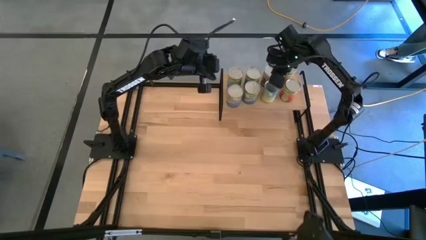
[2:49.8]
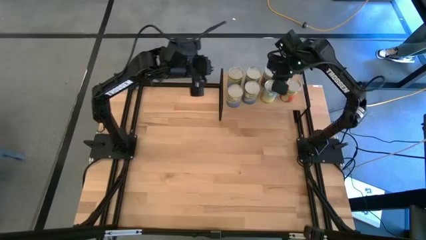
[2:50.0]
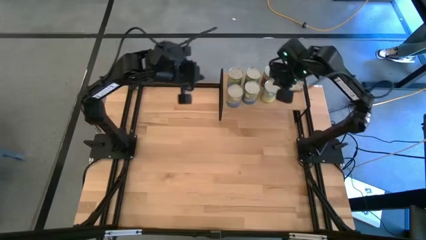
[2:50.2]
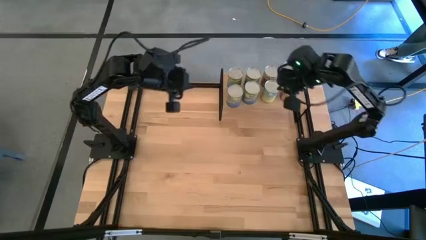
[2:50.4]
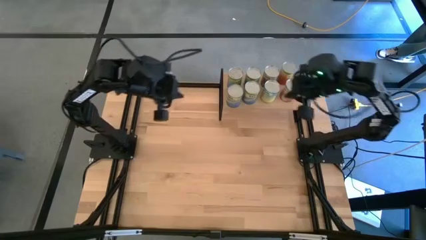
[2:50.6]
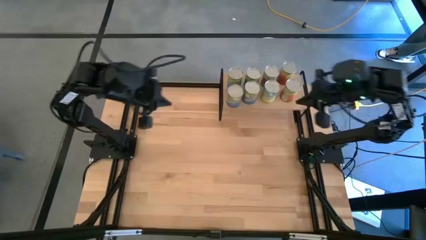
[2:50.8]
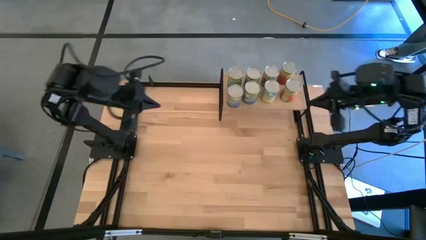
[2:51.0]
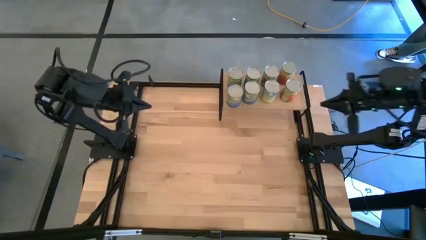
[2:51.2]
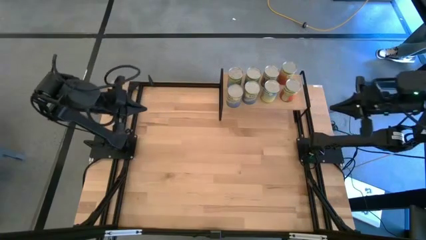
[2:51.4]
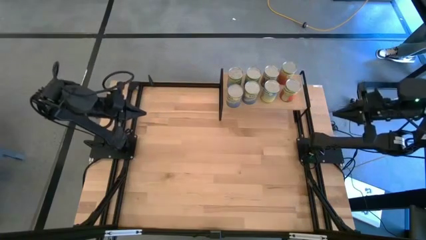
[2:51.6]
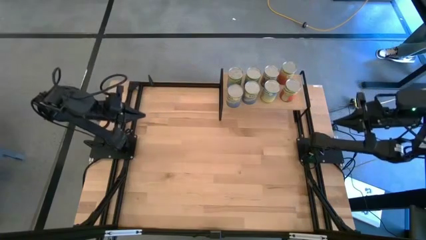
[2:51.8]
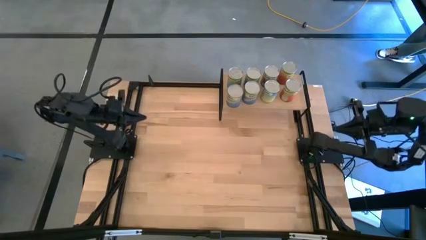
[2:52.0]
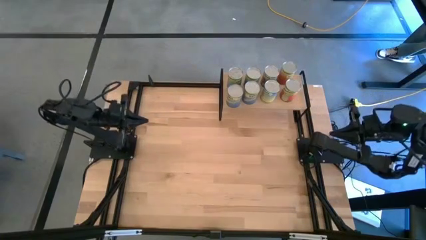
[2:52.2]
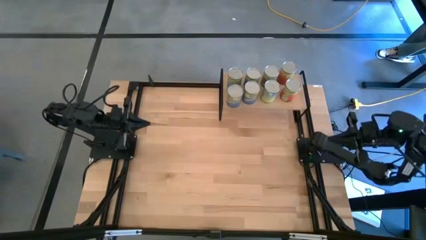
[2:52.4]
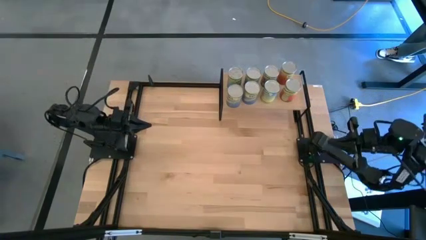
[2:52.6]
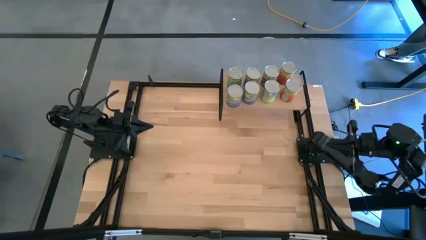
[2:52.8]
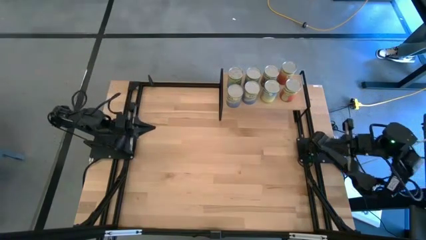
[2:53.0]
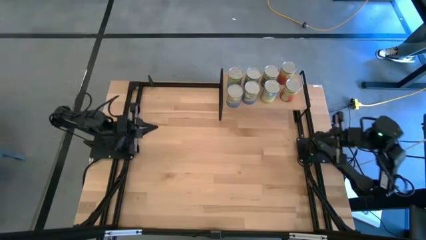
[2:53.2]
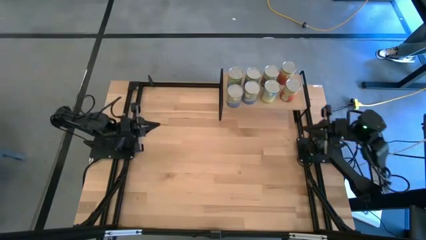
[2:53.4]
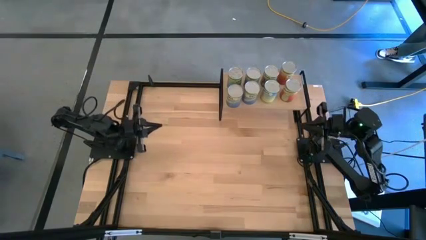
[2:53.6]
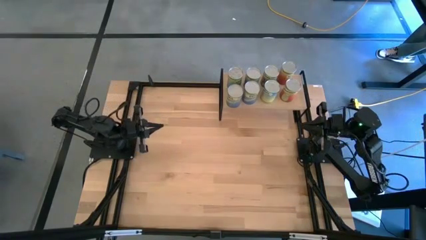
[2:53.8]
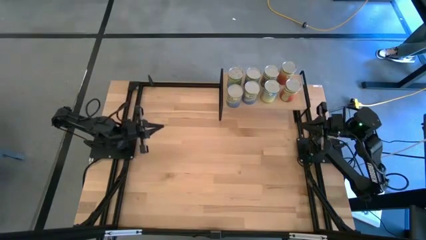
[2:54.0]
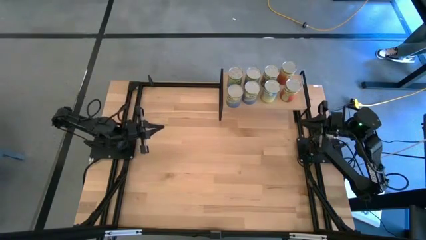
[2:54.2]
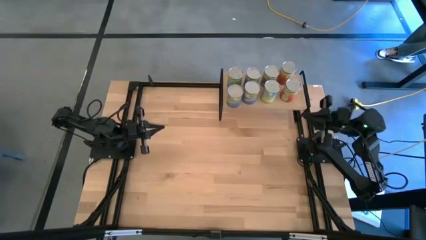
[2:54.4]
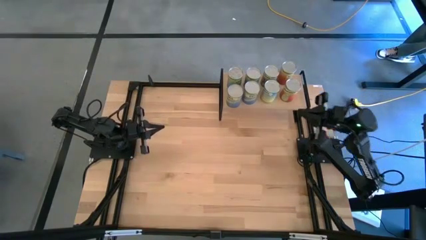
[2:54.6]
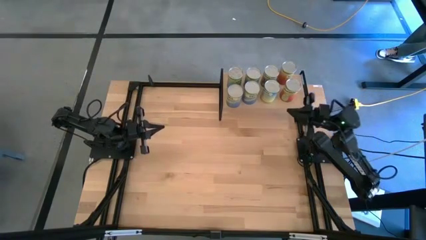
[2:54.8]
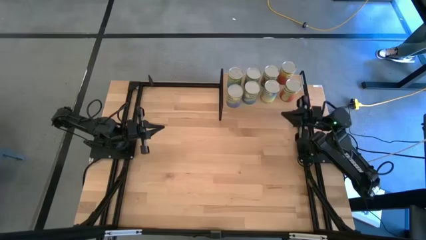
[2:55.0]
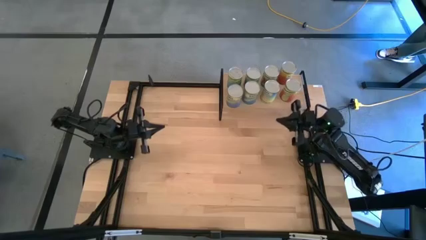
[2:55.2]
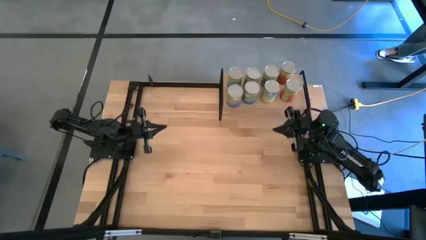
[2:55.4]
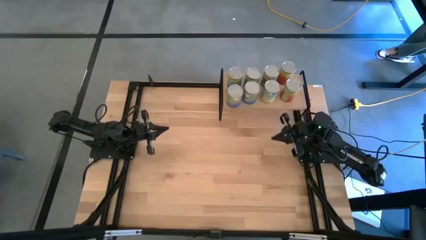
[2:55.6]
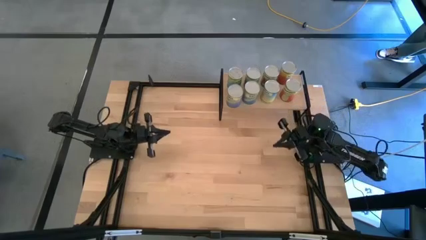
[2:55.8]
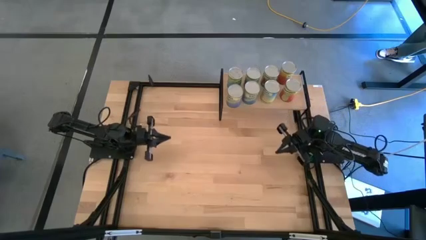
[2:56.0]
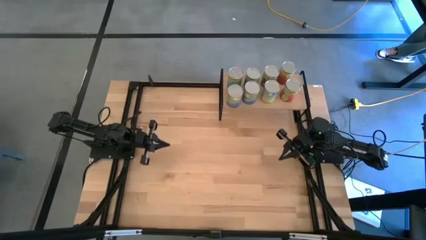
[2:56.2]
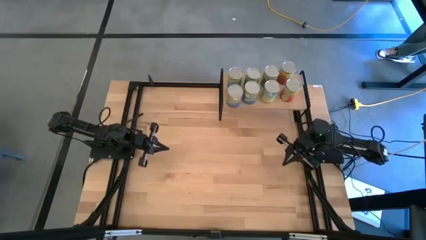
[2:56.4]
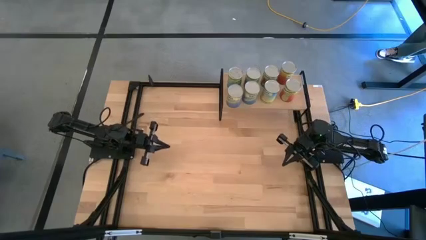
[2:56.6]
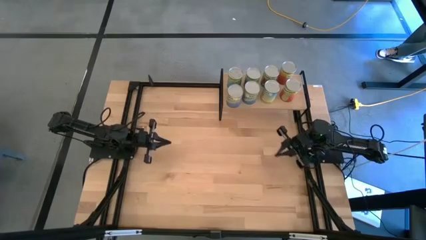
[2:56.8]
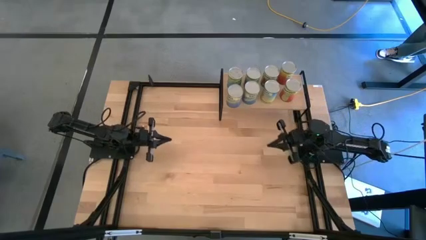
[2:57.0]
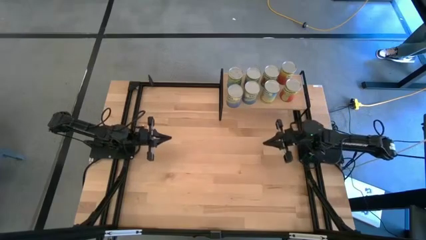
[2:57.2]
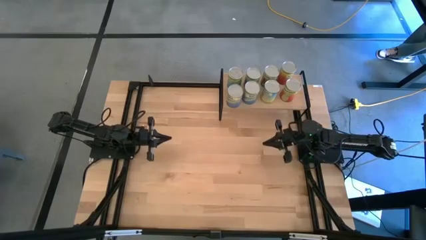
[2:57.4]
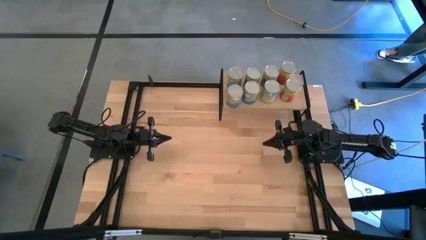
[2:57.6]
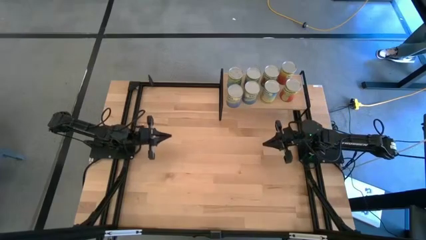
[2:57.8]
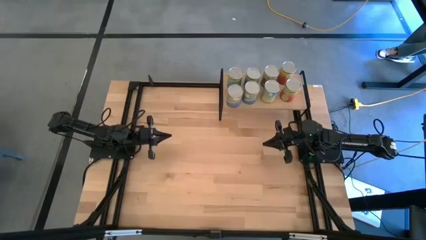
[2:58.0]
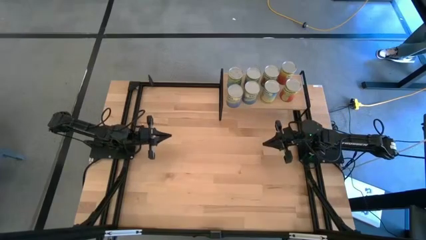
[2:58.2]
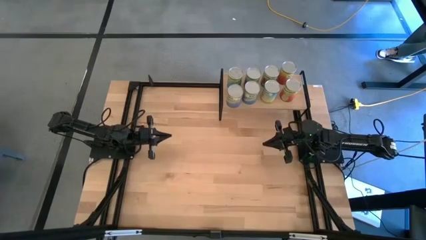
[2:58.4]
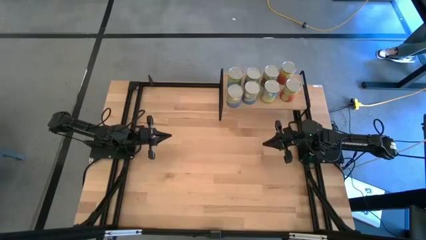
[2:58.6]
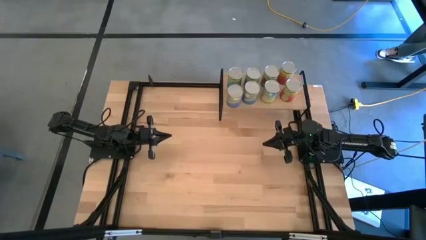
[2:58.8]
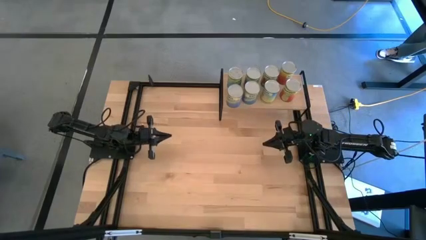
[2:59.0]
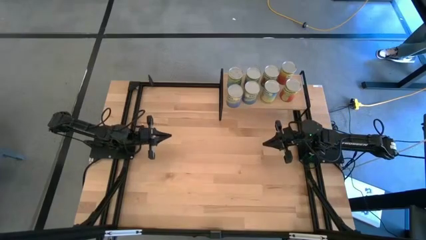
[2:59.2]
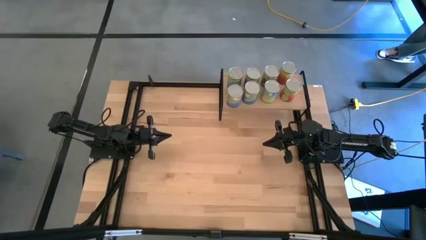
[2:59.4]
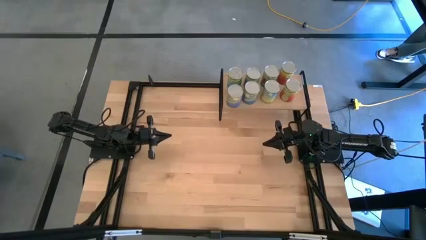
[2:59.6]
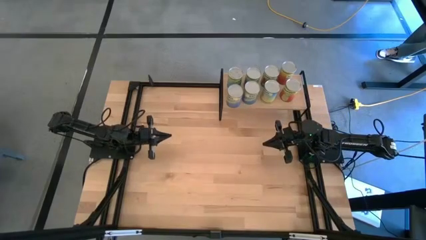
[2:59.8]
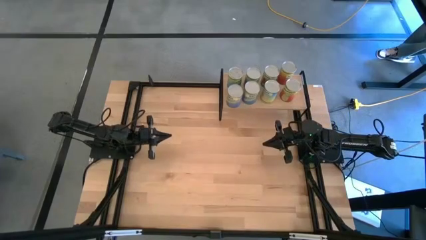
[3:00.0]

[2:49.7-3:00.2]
Task: Pick and place cans onto a shelf
Return to Home Position

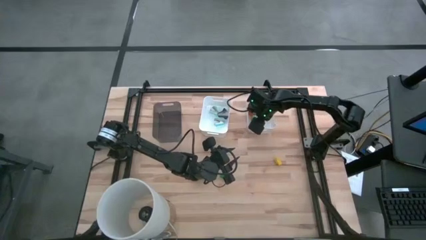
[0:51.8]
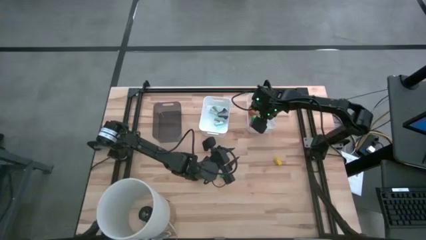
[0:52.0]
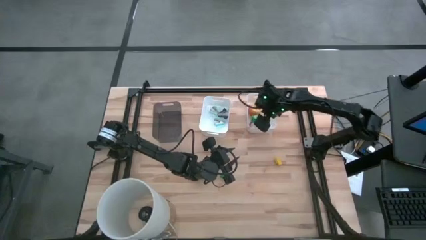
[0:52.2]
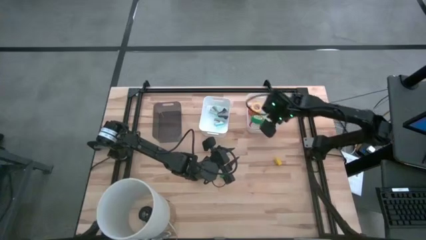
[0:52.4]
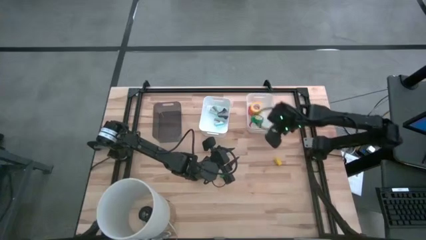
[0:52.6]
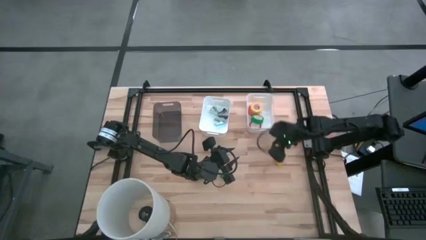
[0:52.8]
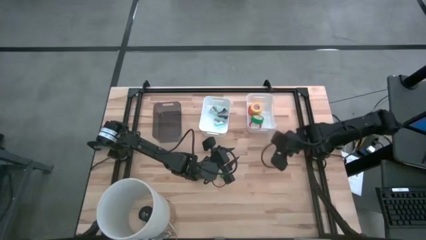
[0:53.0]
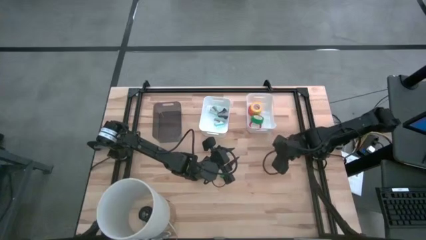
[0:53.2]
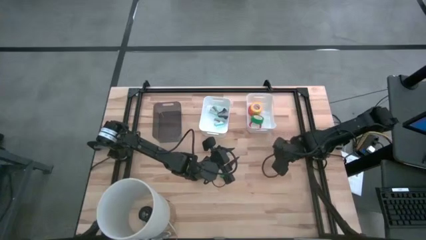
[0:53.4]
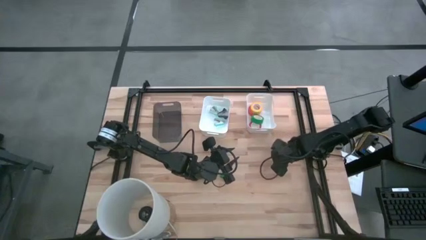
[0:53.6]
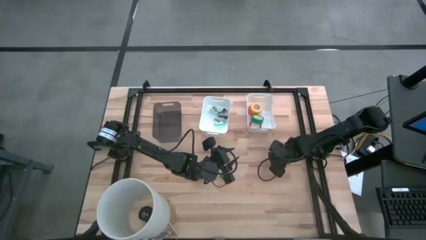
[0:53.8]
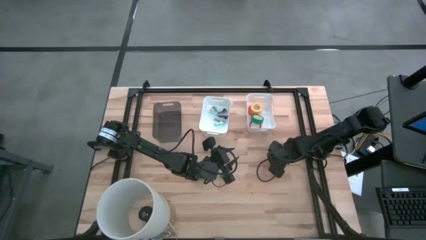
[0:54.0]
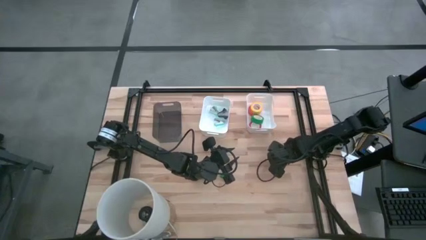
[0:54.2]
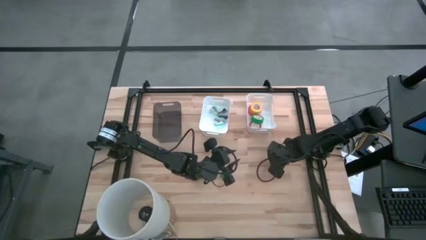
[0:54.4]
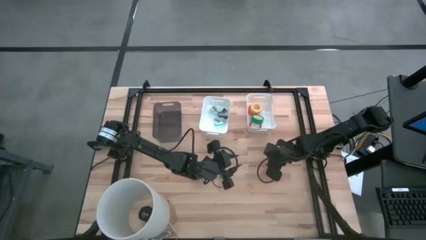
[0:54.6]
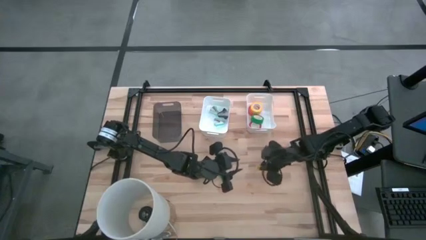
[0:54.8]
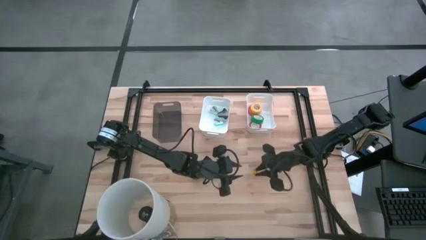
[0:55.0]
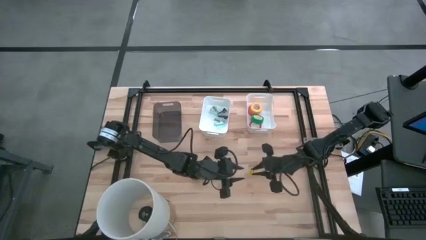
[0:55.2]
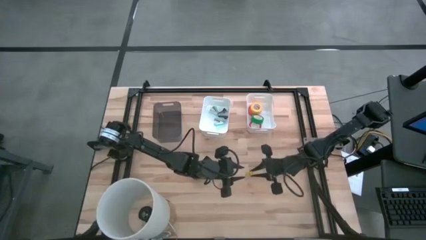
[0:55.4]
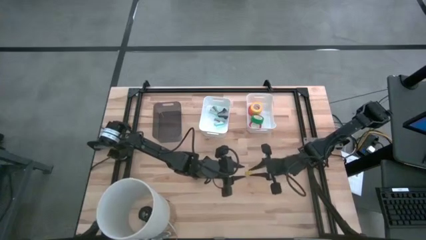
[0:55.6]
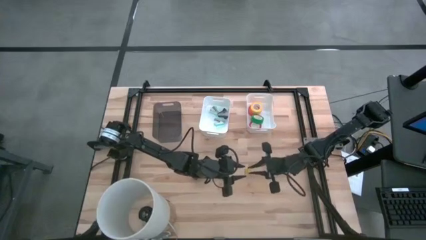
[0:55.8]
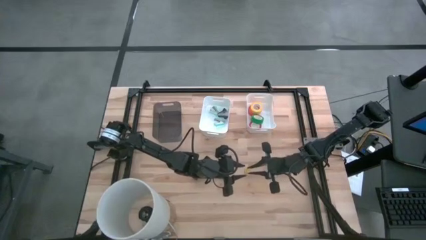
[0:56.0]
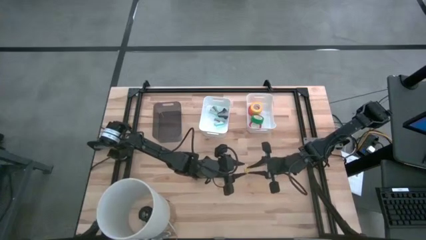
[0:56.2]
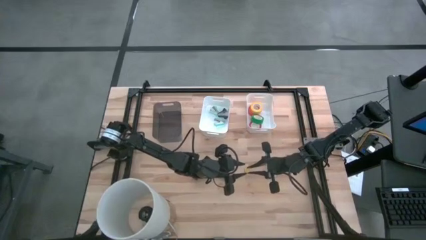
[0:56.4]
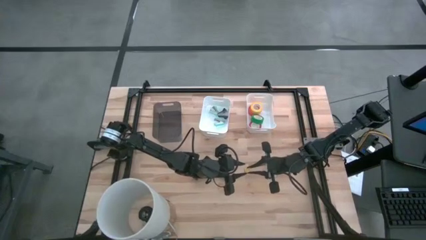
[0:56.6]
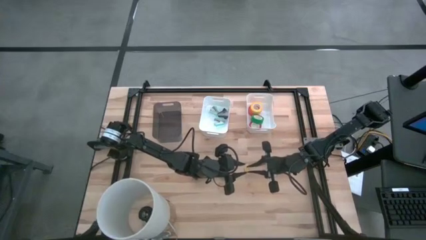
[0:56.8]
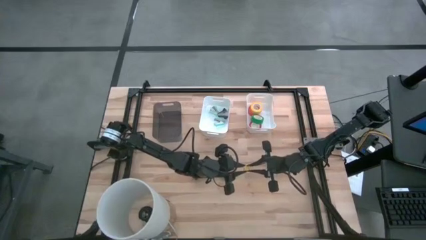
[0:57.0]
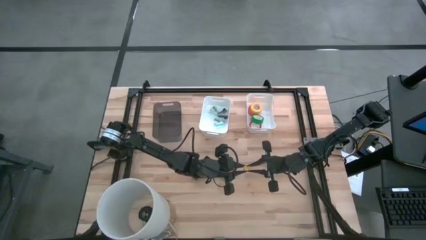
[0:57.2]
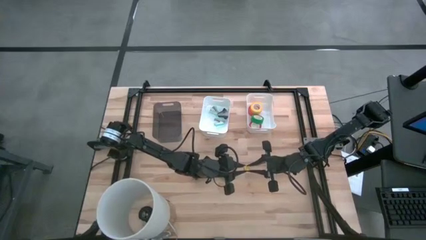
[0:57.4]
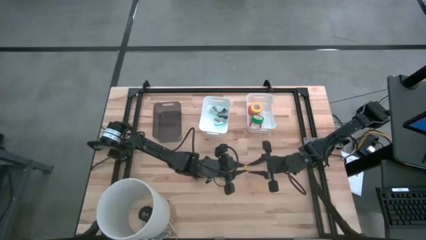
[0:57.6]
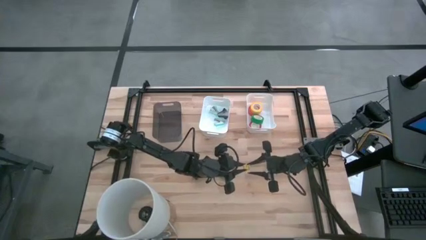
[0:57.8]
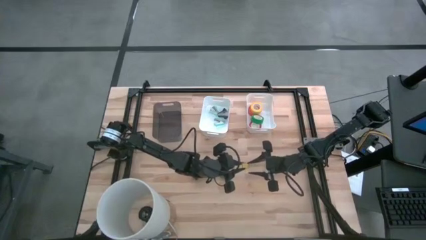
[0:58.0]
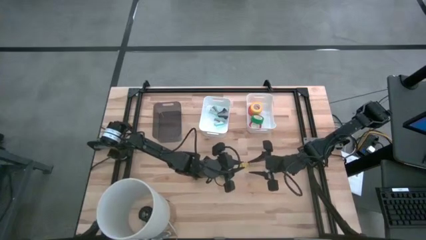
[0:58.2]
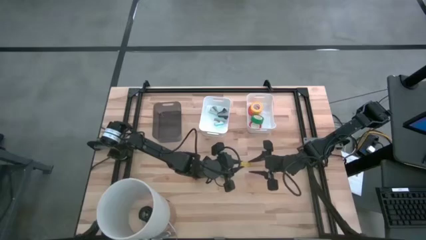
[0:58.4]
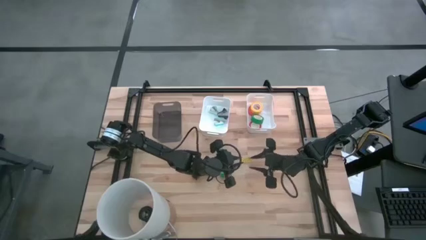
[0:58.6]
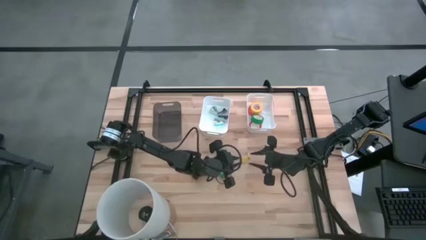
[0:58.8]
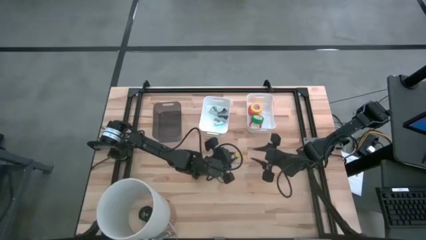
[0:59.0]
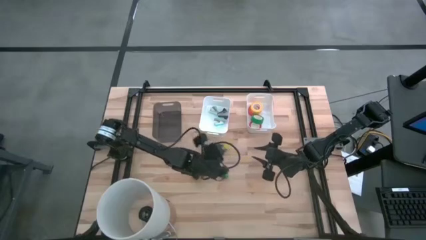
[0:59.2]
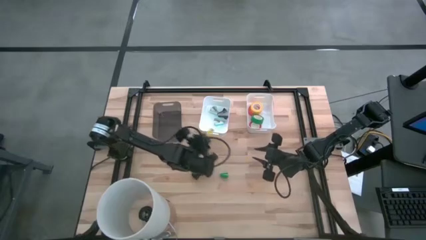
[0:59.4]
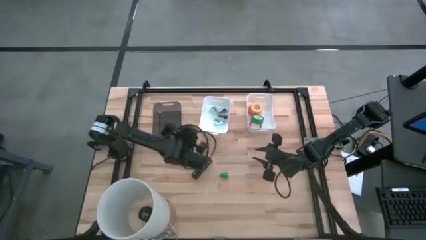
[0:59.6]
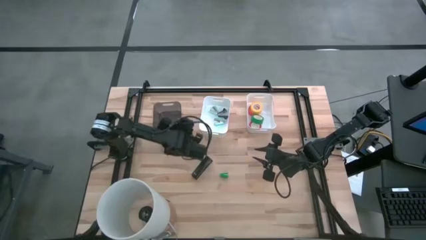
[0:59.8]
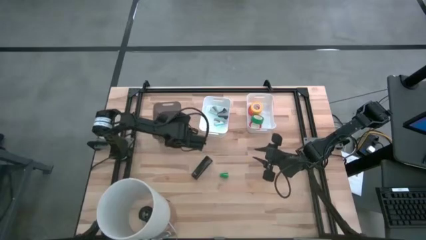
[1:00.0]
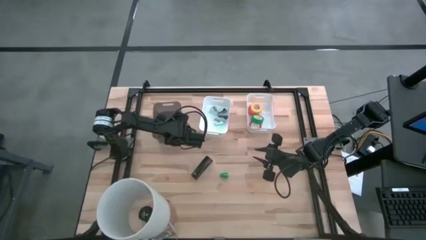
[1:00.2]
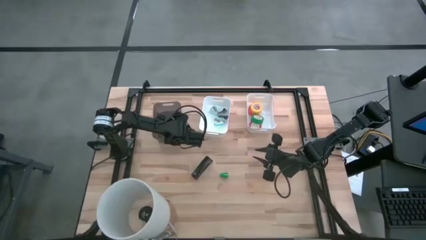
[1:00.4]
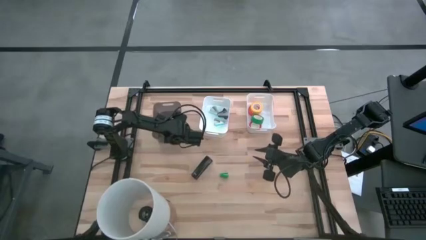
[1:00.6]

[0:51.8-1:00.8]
Task: Pick and place Stapler, Stapler remover, tape
Put the yellow stapler into the black bin
